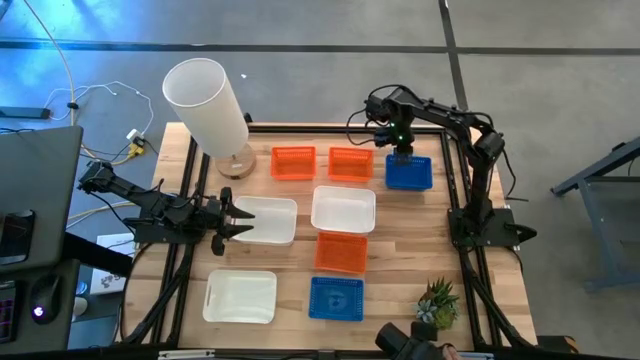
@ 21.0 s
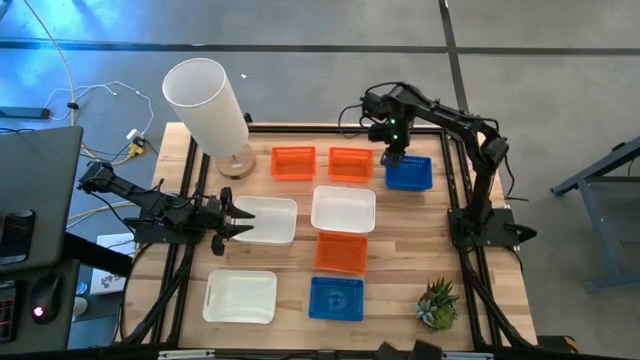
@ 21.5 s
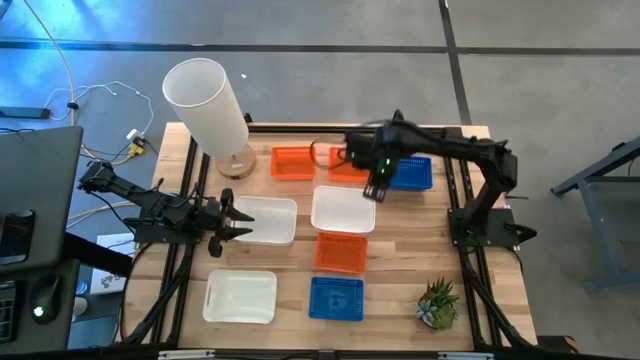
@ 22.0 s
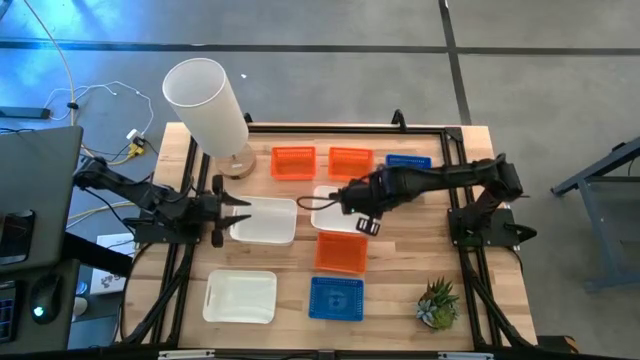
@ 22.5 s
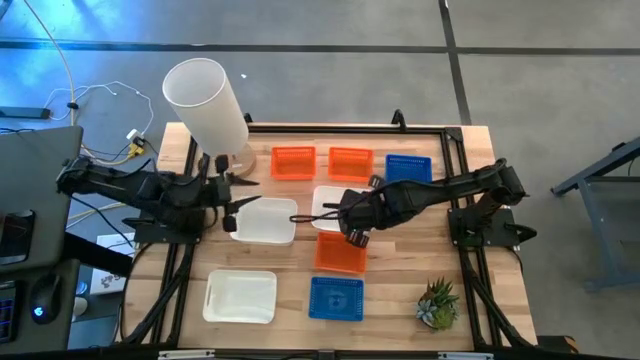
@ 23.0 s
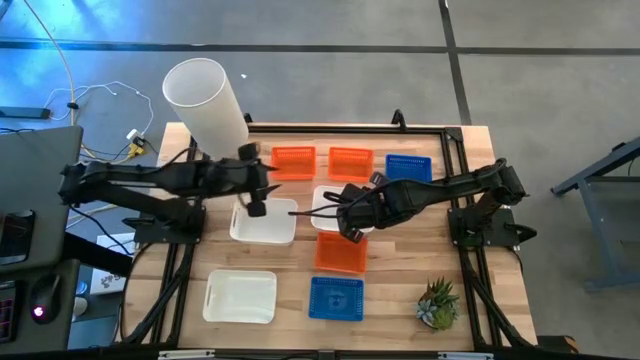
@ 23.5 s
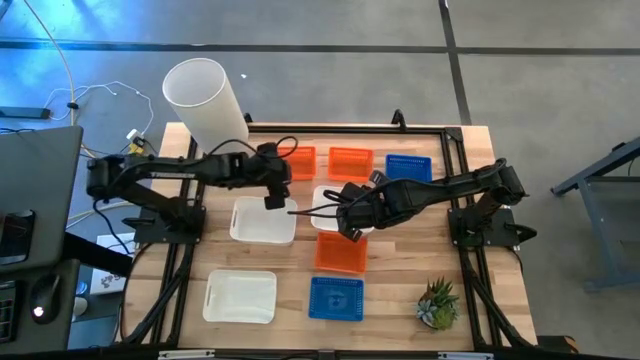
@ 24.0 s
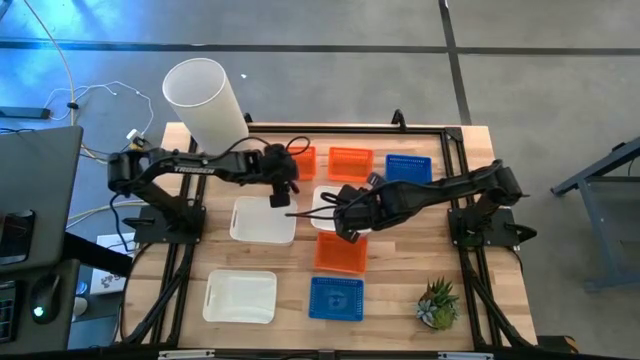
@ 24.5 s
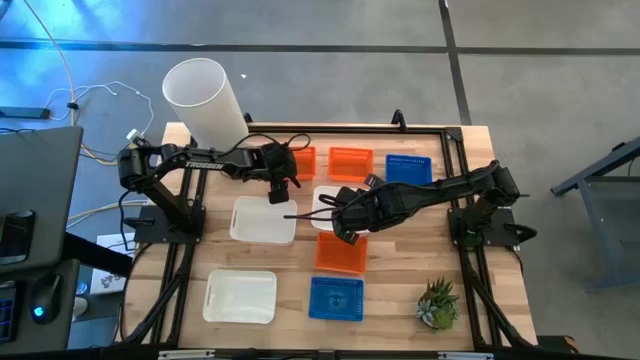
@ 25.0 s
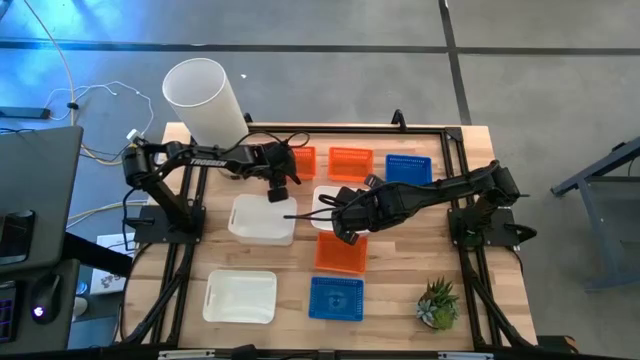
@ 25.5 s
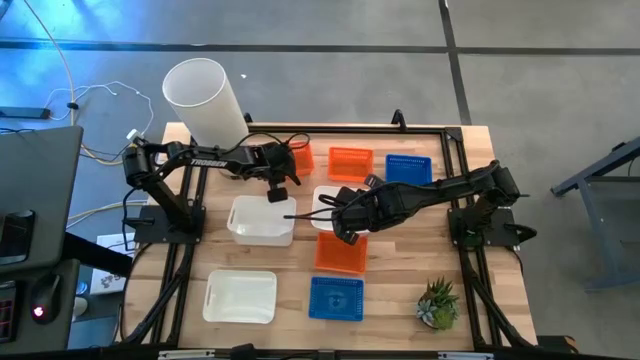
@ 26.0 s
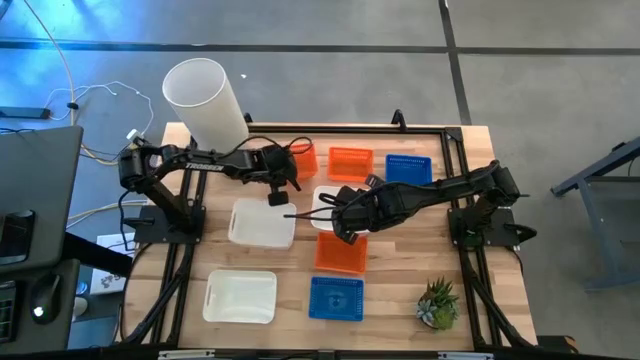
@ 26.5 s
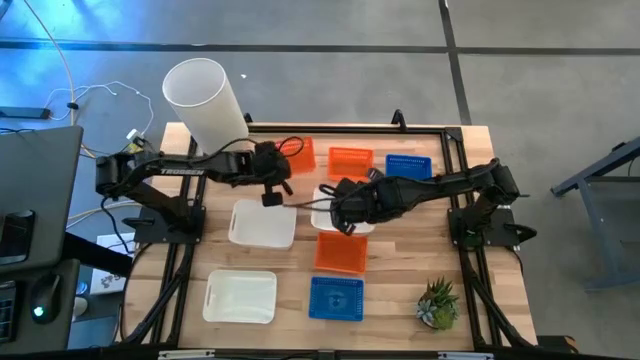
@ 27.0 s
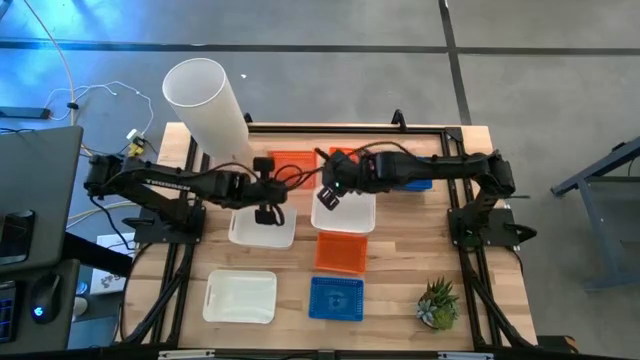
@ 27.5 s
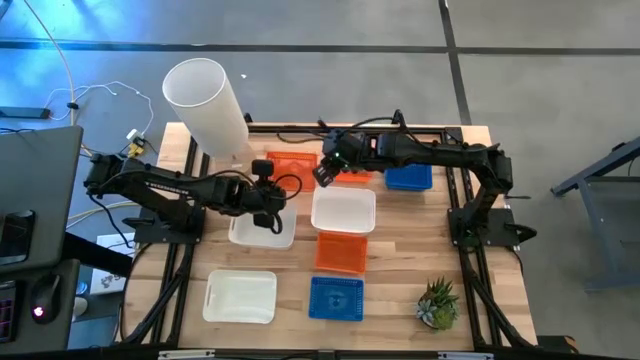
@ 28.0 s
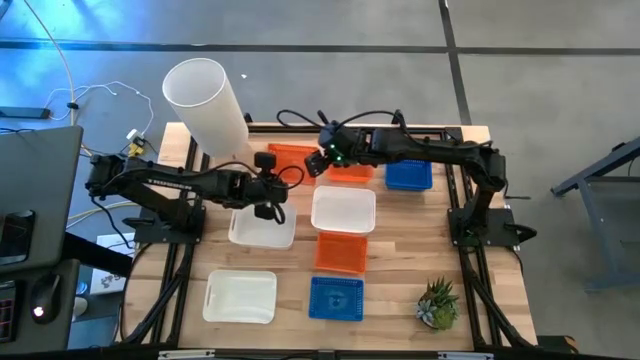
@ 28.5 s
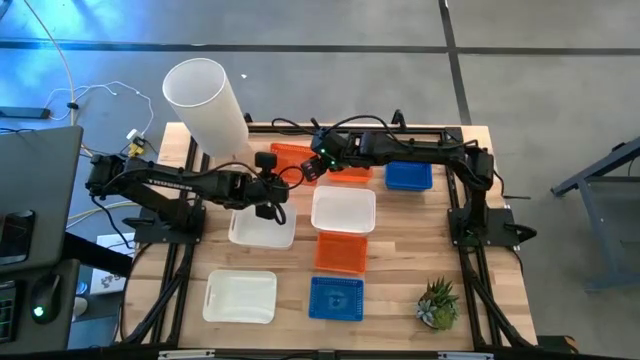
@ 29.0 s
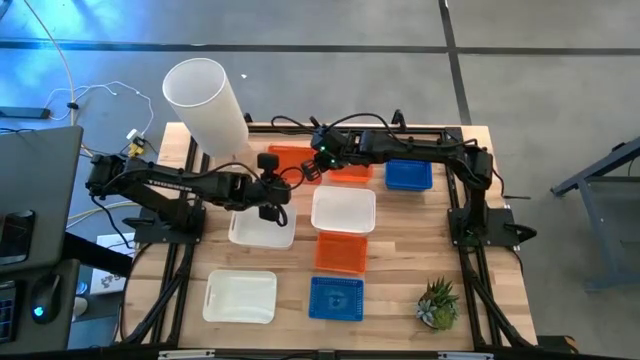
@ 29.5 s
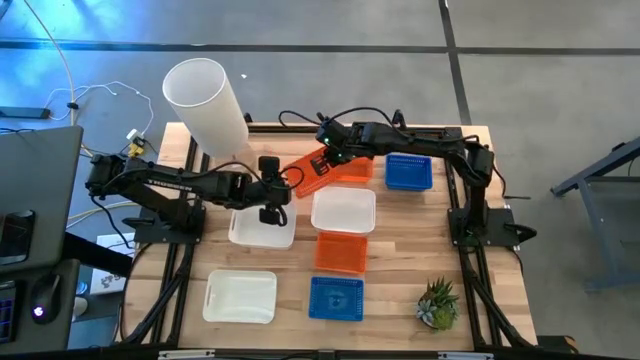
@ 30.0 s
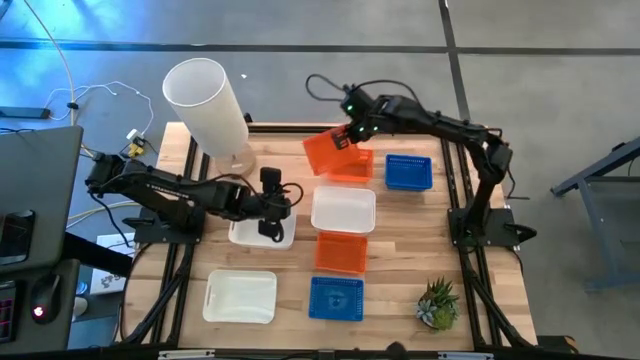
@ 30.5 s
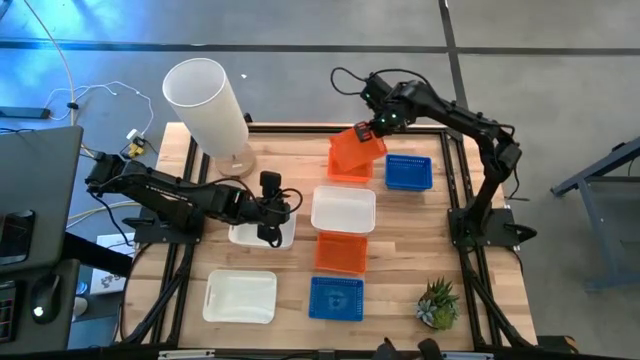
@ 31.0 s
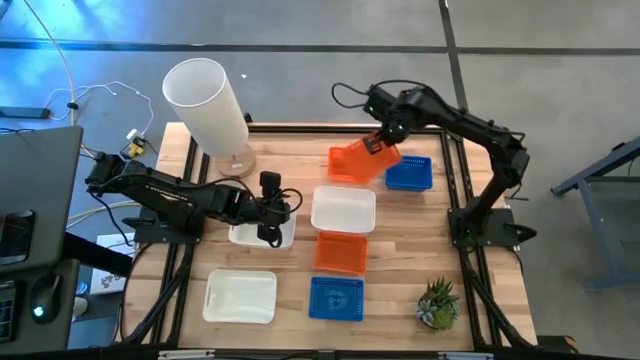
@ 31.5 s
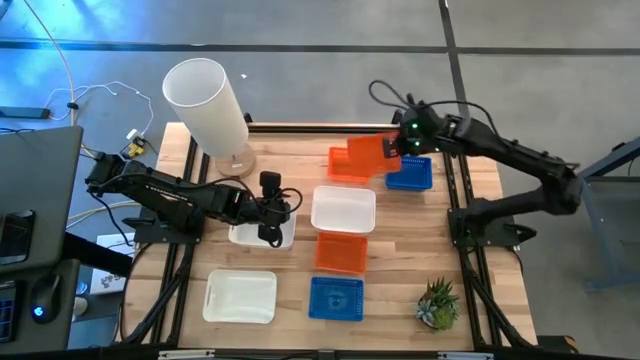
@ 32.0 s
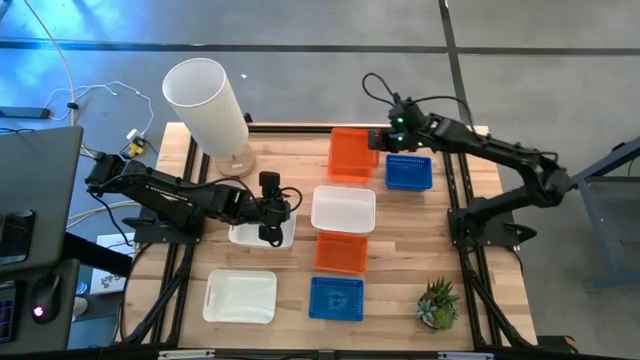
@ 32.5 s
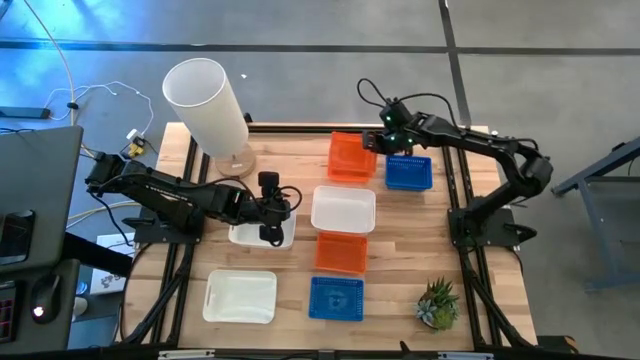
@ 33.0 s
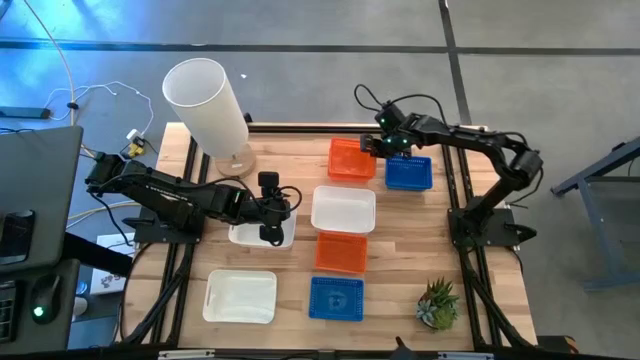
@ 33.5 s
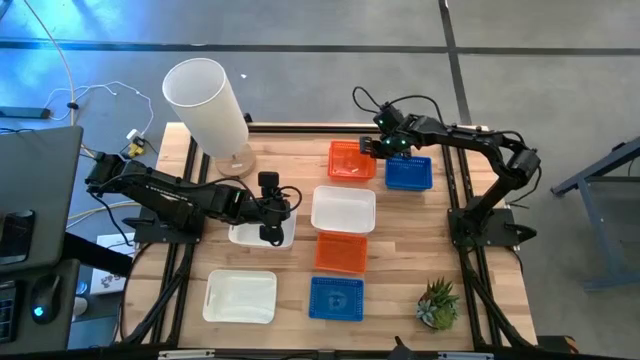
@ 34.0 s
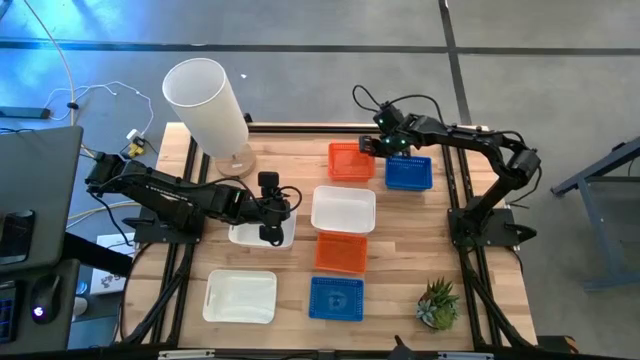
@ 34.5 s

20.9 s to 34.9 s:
Stack the top left orange bin on the top right orange bin

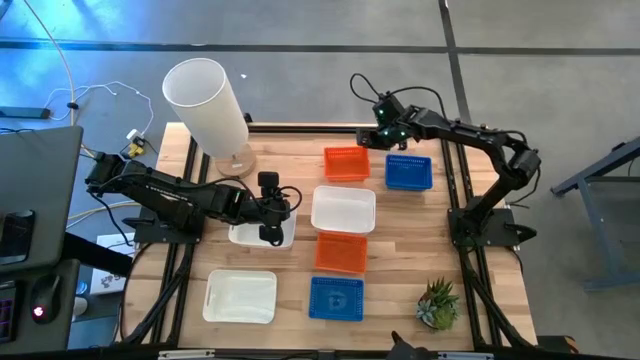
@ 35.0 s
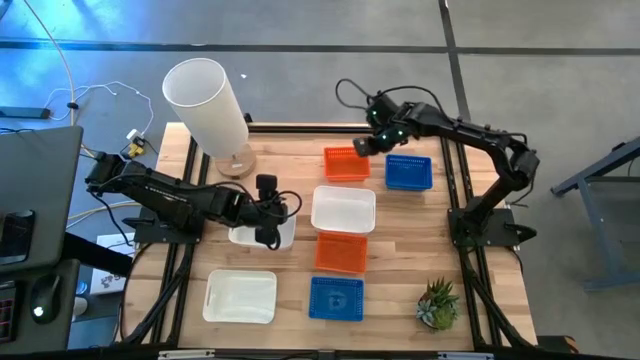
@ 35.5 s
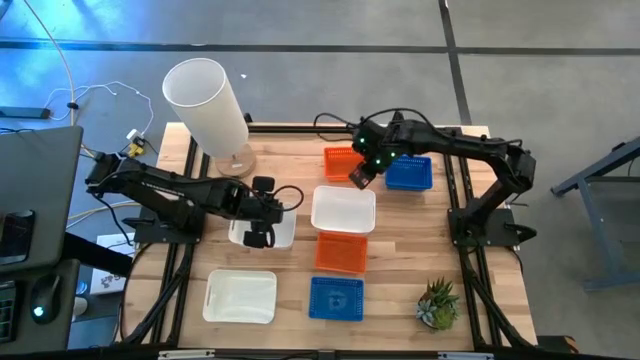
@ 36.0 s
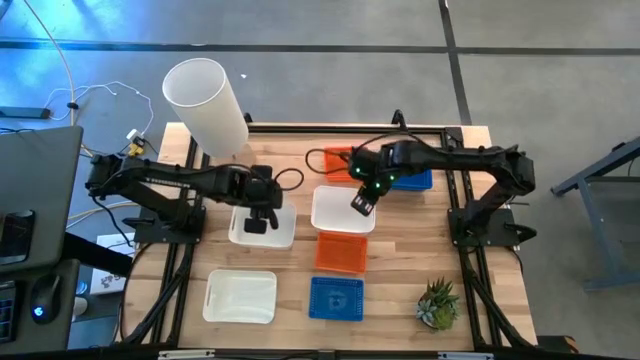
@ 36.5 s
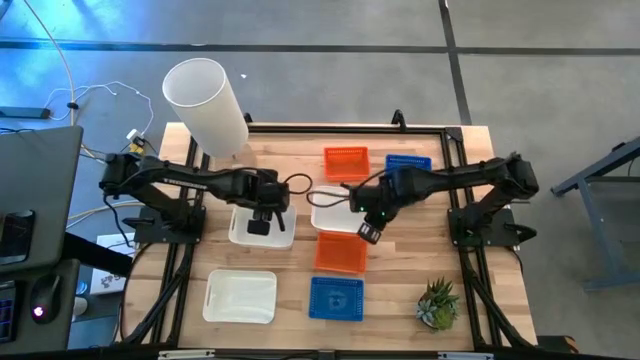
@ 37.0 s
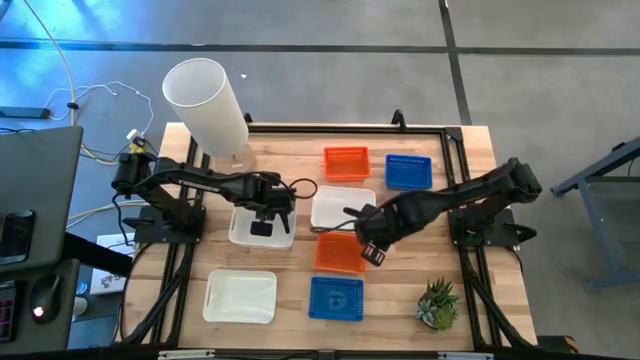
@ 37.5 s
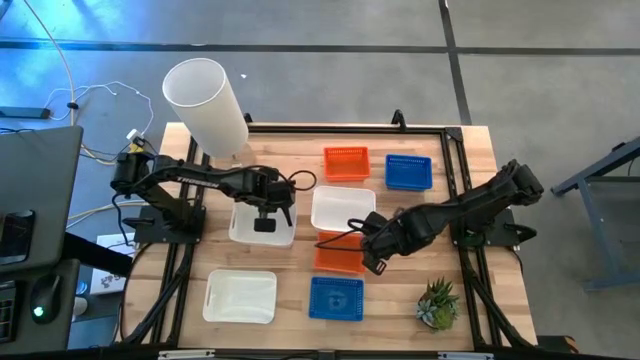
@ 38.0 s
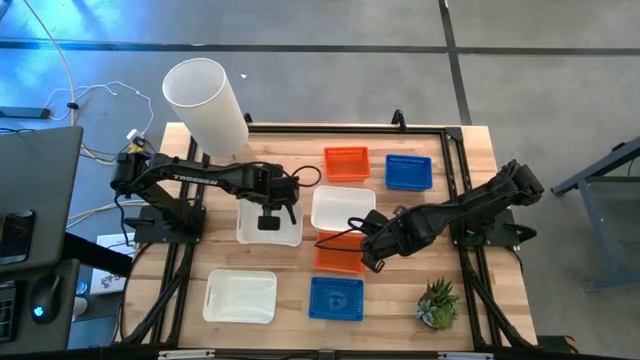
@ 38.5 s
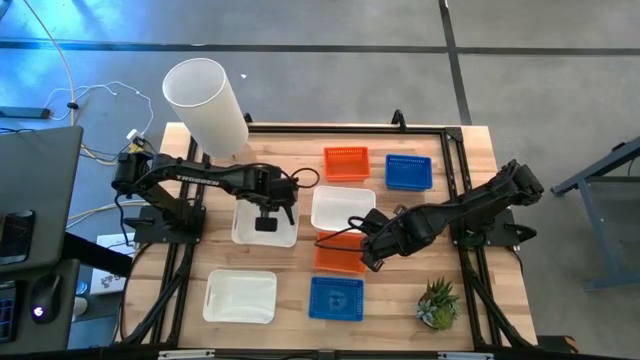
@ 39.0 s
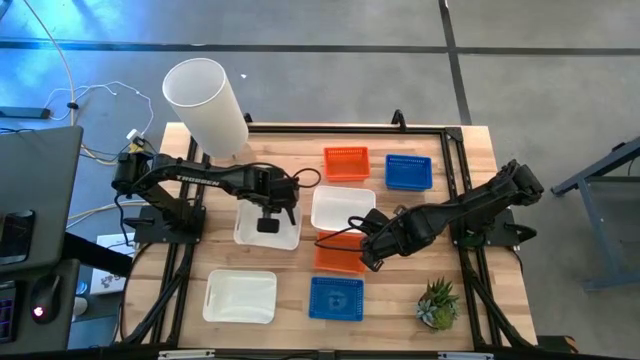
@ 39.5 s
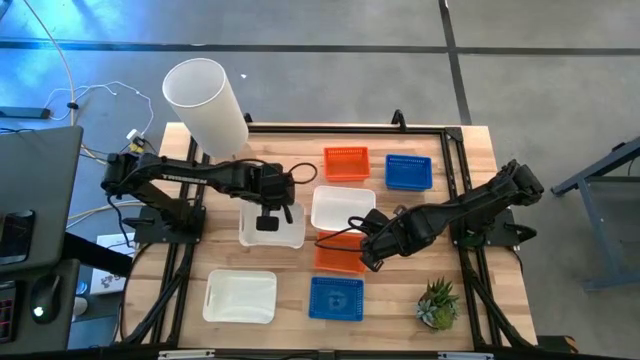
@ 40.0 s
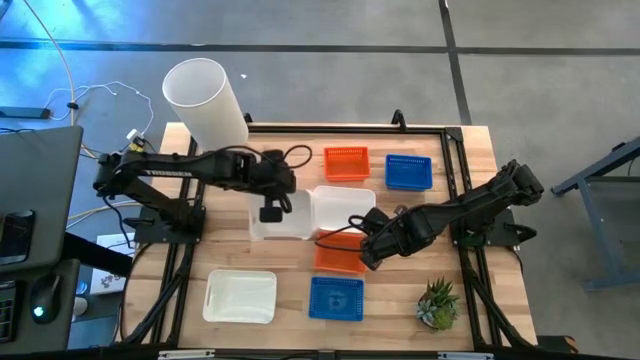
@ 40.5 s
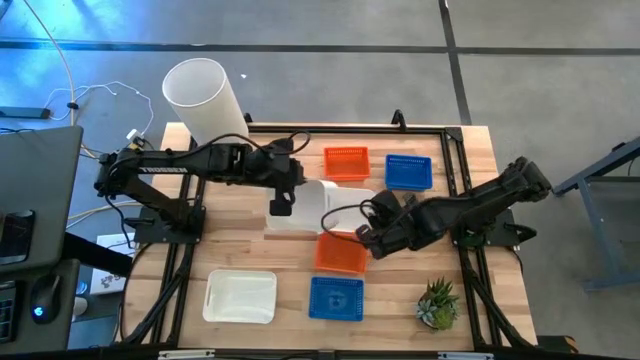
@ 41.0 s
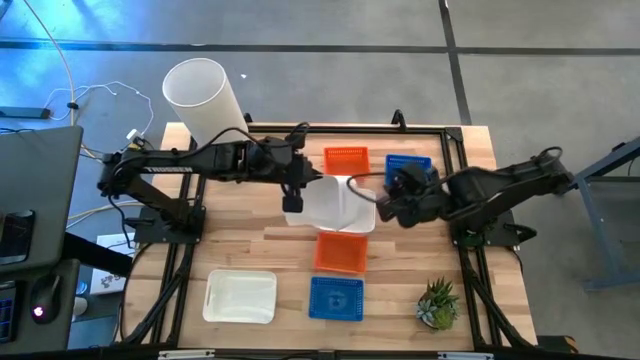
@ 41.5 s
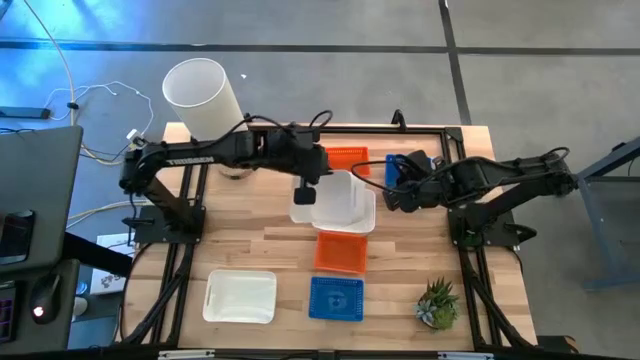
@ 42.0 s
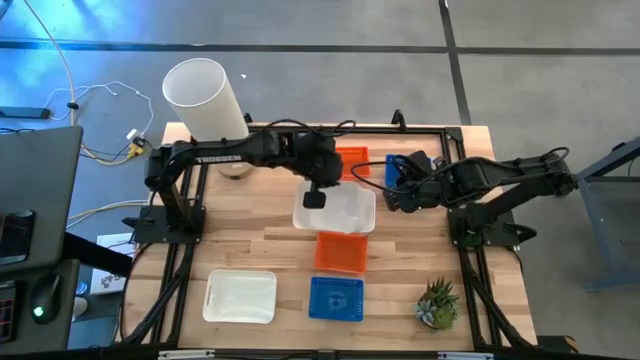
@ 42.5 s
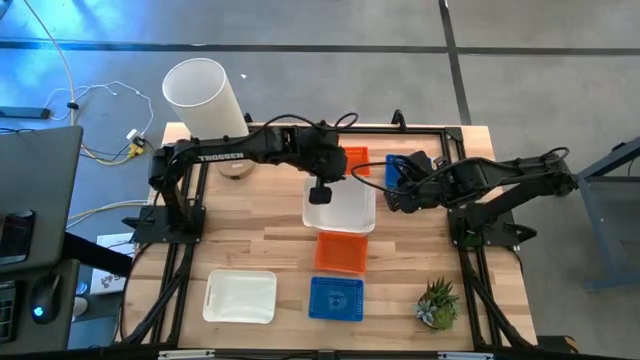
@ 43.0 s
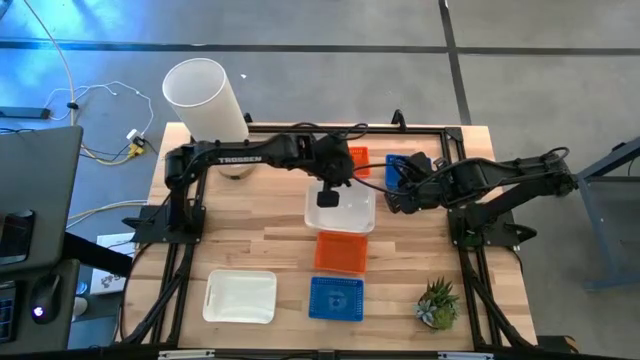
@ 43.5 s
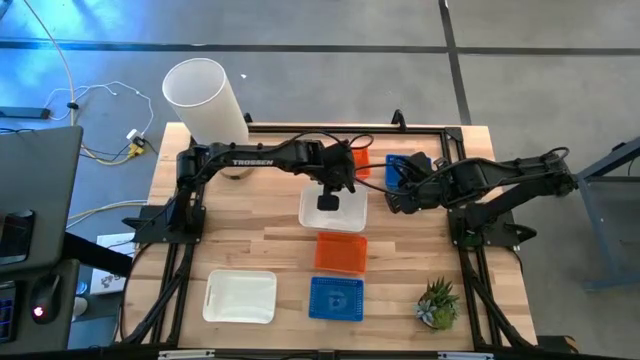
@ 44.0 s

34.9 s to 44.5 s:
Stack the top left white bin on the top right white bin
